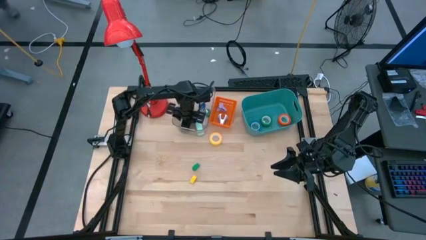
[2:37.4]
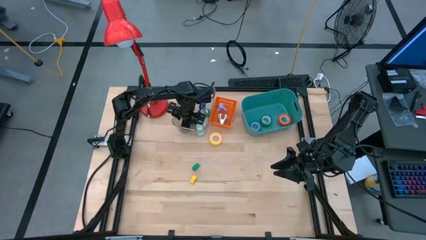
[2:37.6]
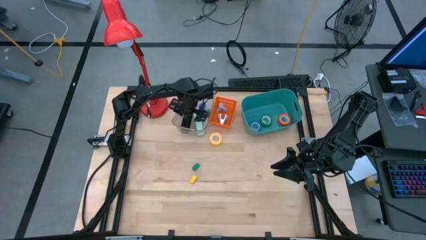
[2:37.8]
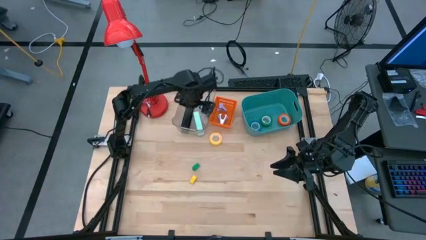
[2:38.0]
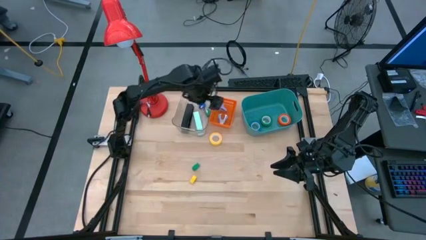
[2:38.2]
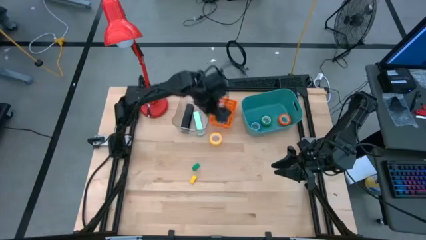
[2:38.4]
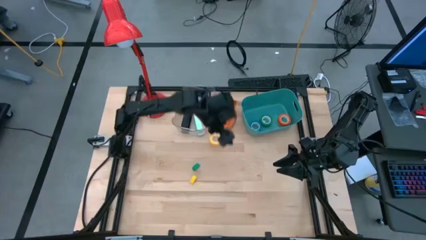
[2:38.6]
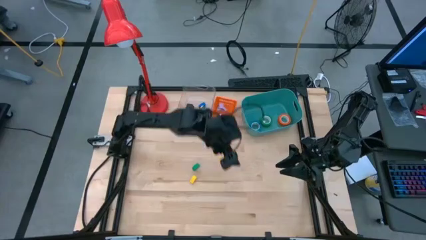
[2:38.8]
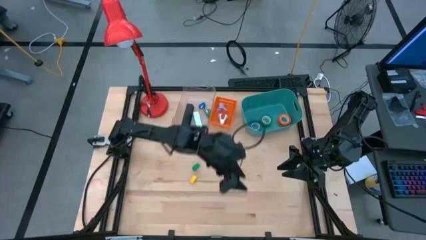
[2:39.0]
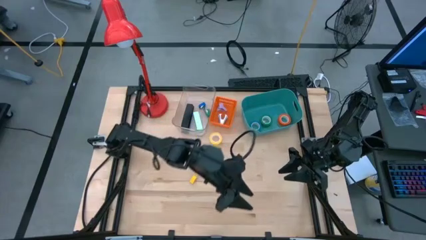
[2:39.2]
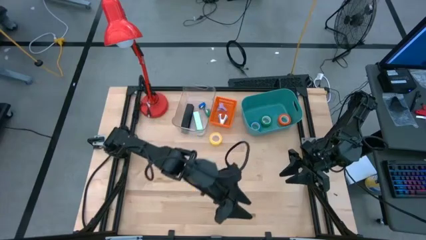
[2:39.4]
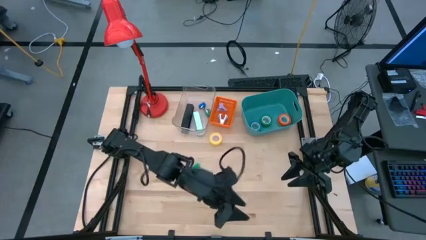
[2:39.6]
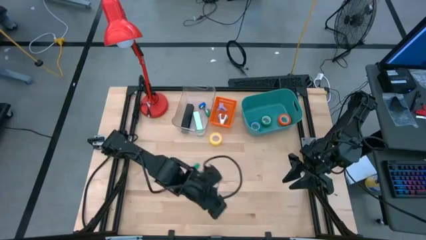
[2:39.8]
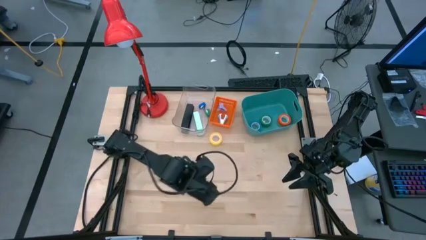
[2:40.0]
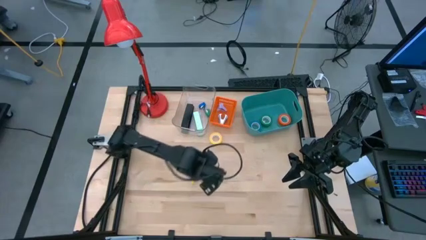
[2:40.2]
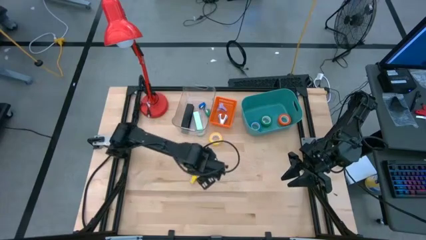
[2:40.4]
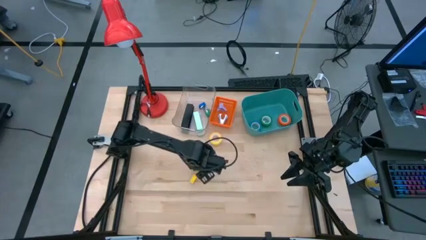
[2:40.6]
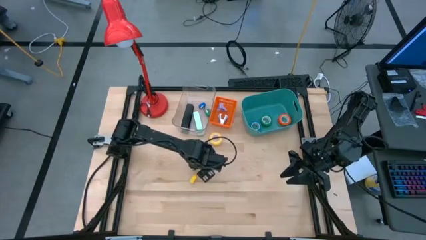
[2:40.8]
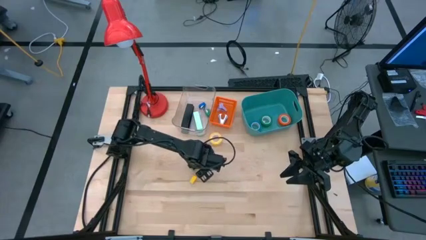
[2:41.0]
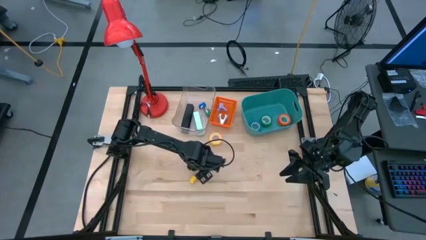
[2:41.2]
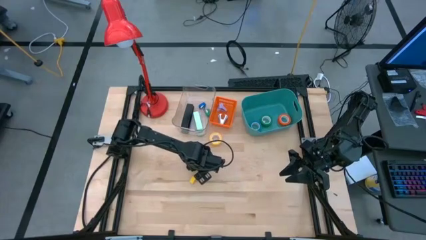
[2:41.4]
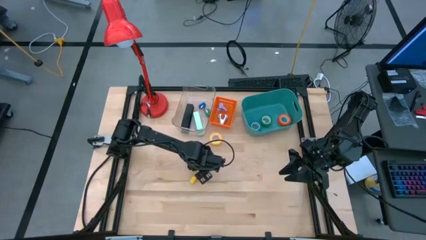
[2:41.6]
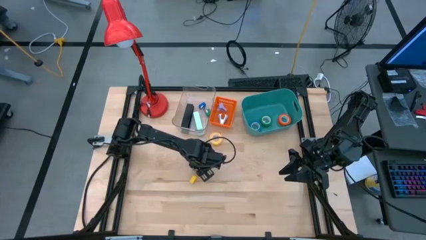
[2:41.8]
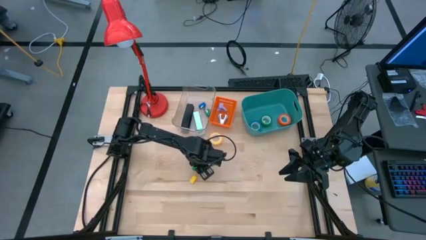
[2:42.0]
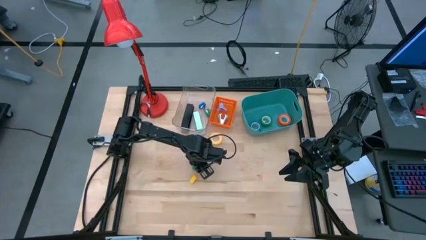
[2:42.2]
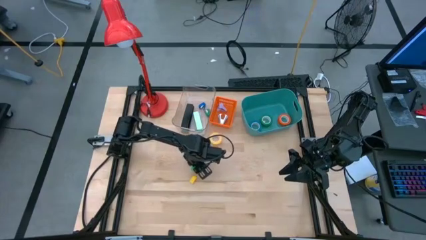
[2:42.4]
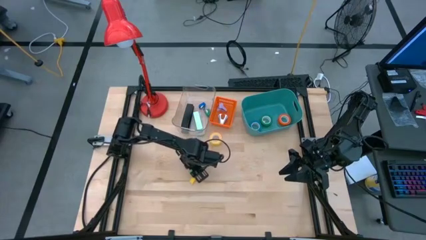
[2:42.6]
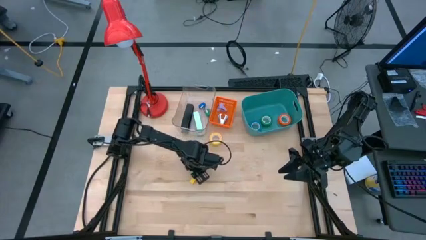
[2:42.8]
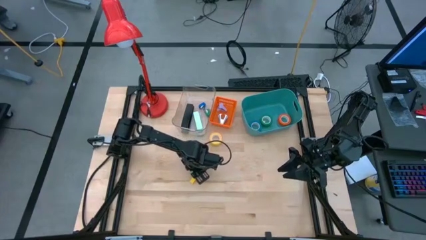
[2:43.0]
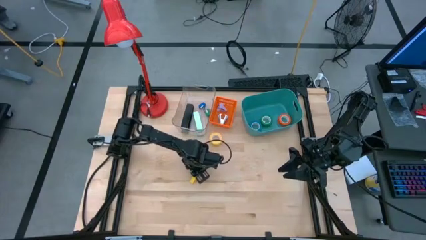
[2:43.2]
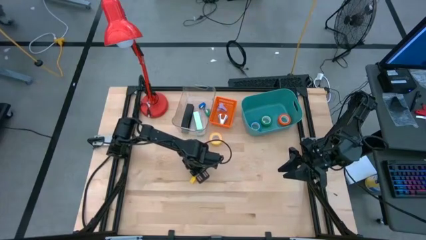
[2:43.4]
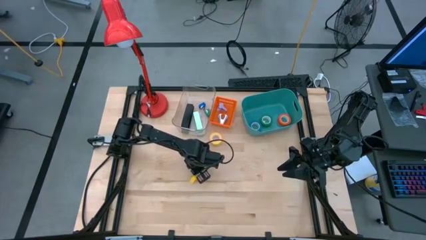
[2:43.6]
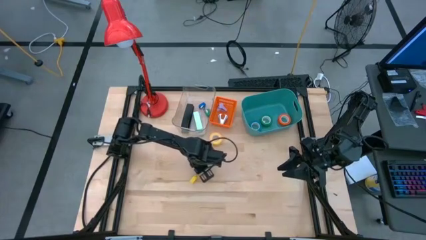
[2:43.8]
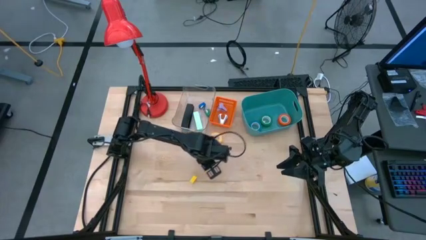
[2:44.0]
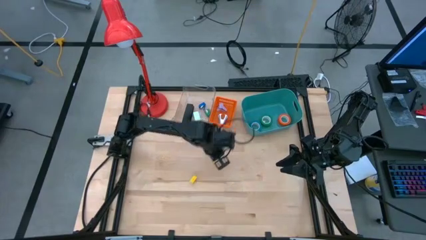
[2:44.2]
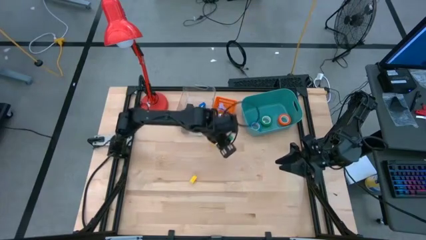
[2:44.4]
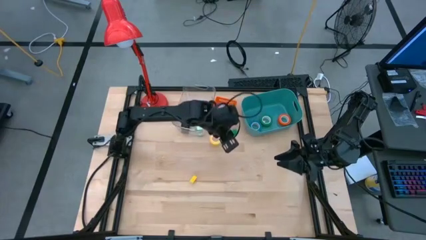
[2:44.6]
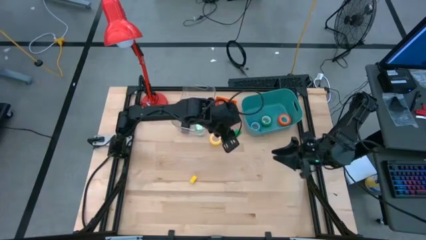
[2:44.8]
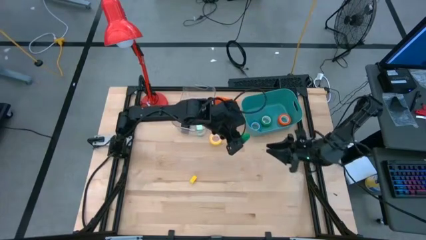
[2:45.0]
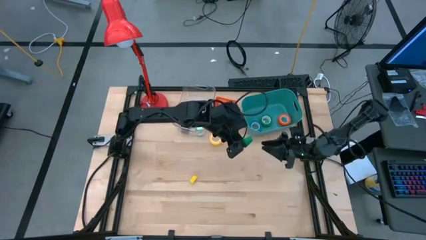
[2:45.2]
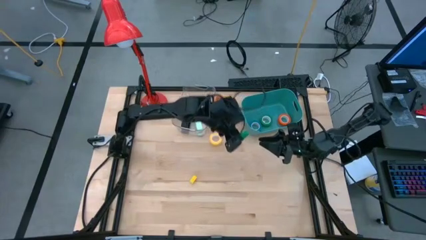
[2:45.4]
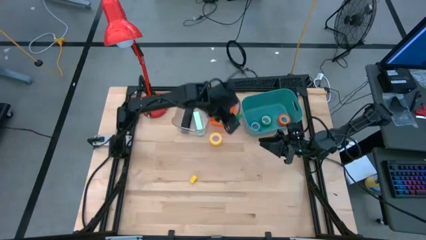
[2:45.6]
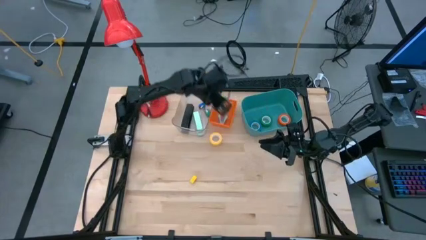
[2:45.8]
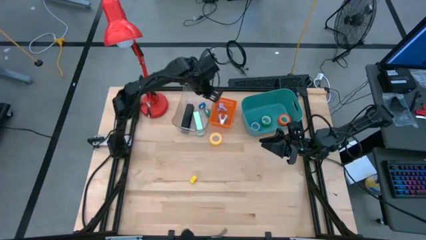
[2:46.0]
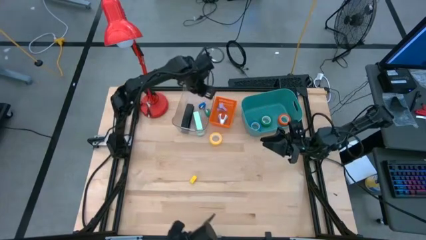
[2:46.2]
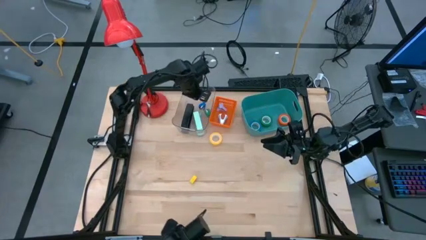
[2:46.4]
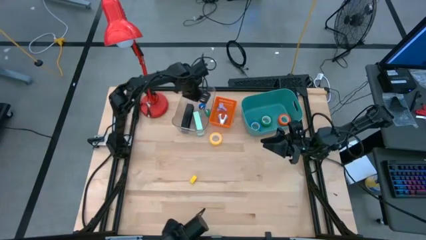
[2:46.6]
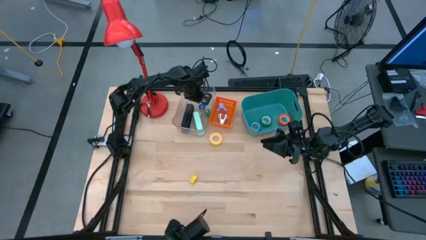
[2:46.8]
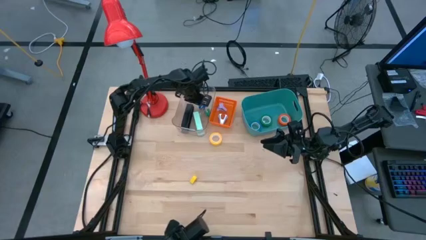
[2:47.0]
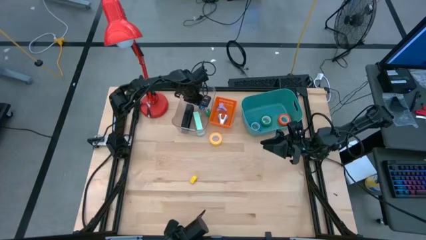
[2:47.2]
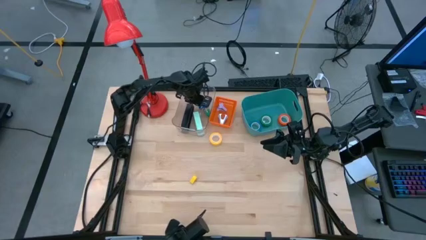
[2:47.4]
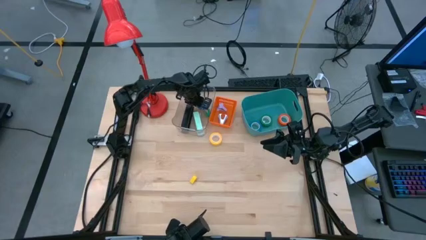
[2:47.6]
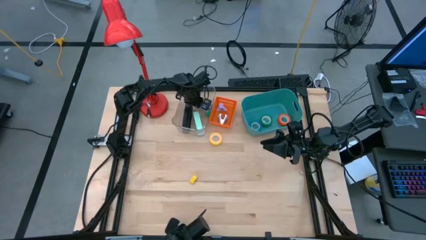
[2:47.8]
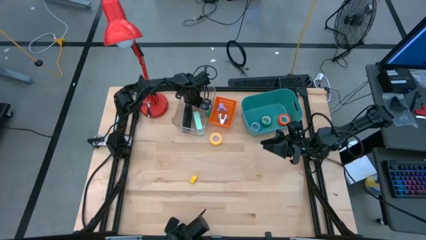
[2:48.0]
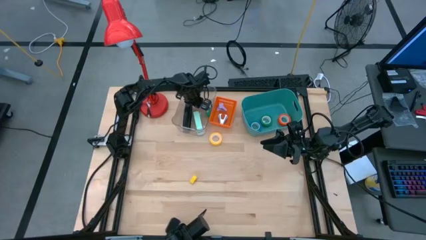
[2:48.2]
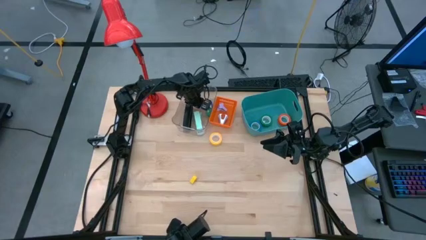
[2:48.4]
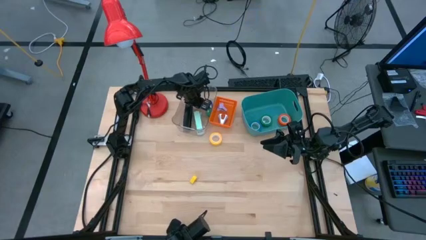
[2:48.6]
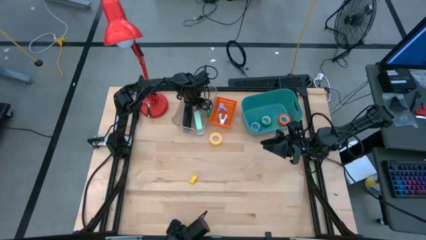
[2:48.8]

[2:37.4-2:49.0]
Task: Pick and place Stapler, Stapler remover, tape
Put the green stapler into the transparent bin

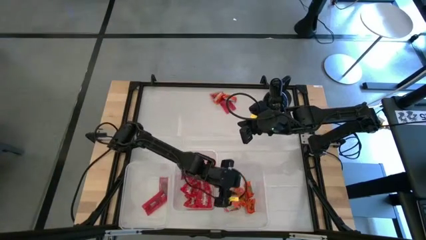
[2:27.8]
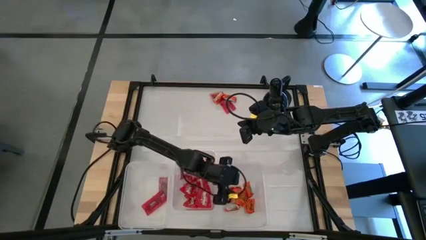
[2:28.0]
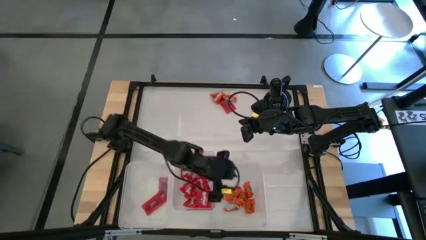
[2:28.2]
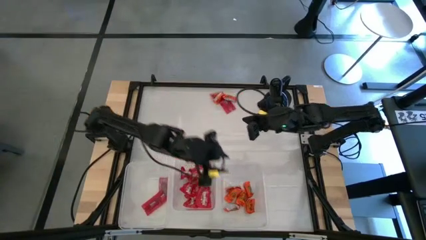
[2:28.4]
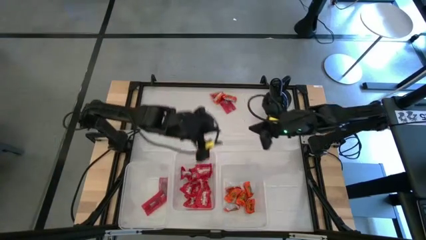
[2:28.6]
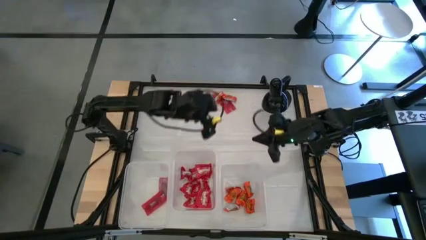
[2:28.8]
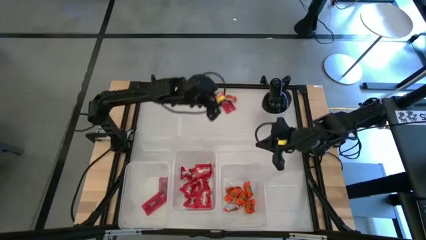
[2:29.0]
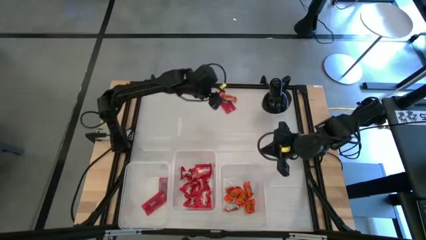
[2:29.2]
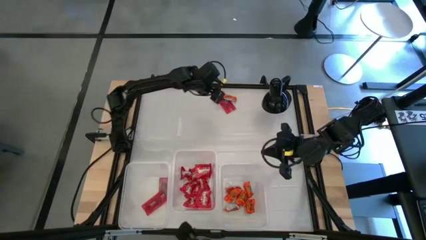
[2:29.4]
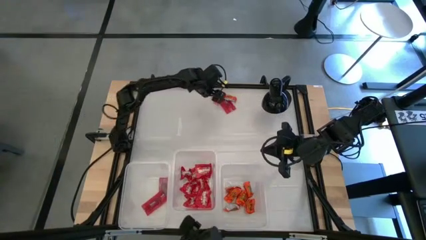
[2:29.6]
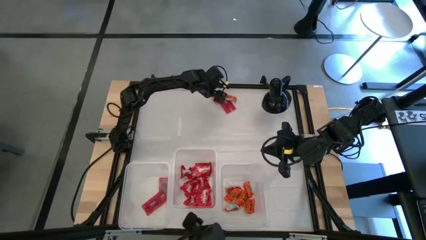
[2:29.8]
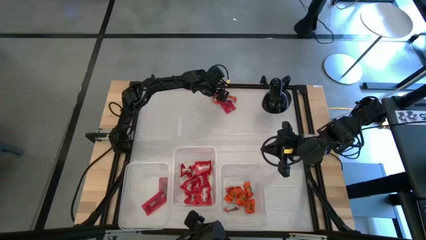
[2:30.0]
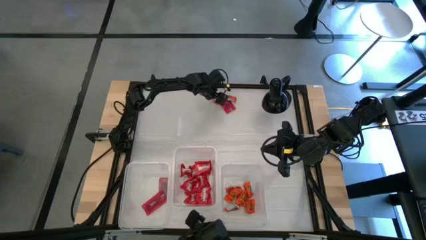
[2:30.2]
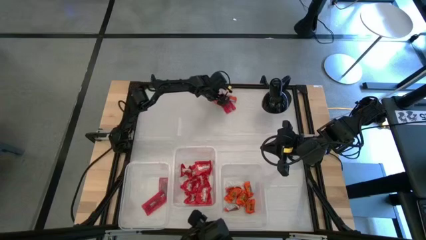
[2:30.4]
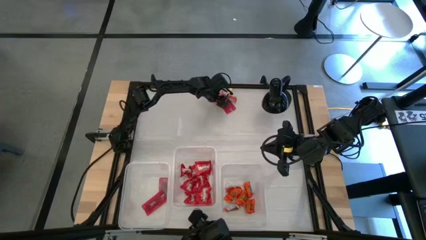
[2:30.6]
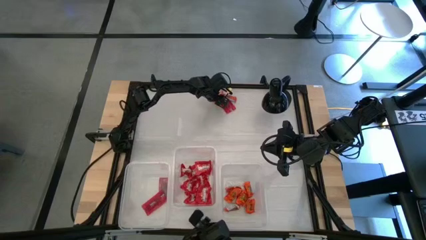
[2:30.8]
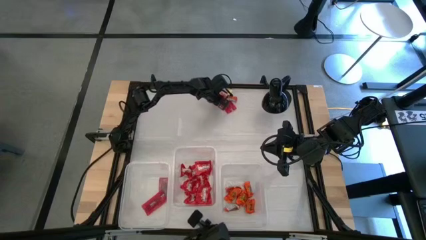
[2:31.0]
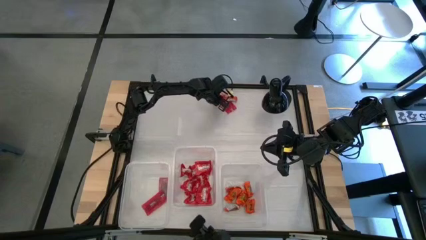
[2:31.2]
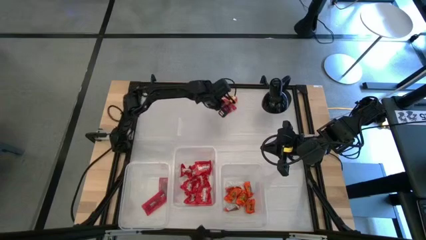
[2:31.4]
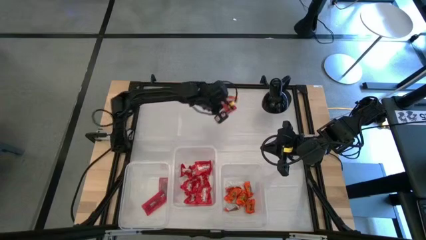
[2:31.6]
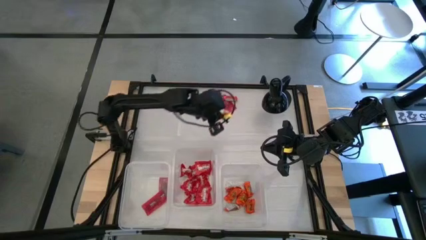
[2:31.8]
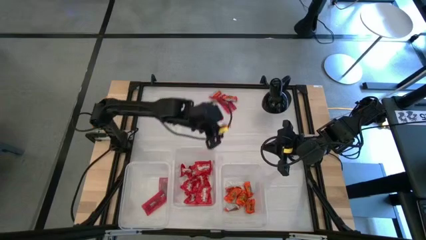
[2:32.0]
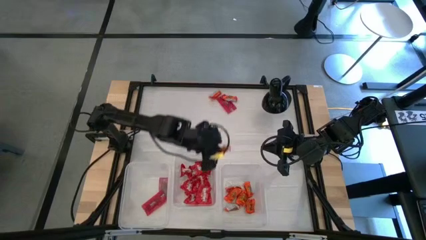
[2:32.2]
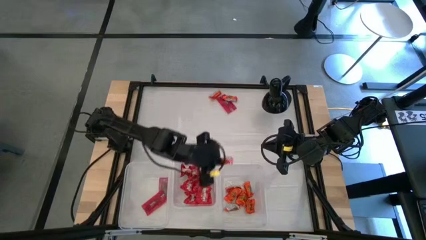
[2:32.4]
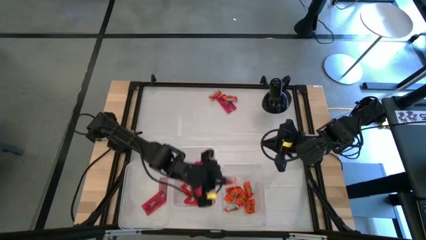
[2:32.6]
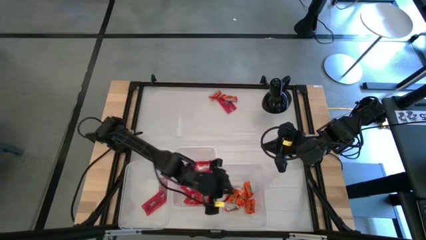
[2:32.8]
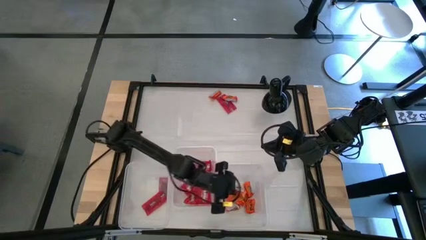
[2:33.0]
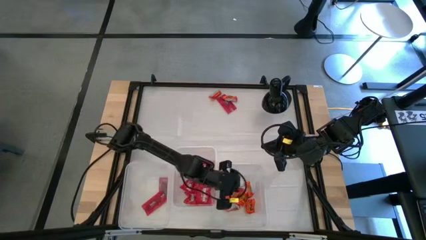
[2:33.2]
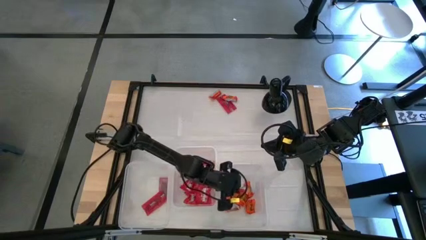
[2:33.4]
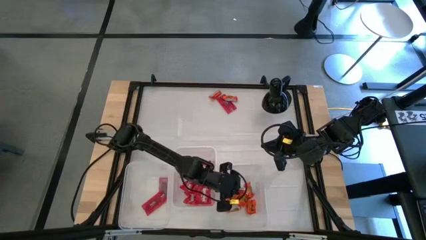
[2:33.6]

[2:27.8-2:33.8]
Task: Sort candy
Put the orange candy into the right transparent bin
